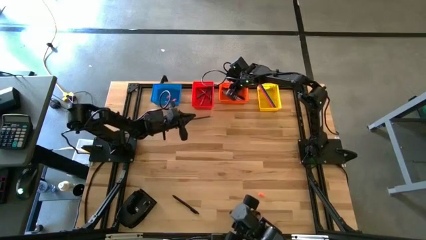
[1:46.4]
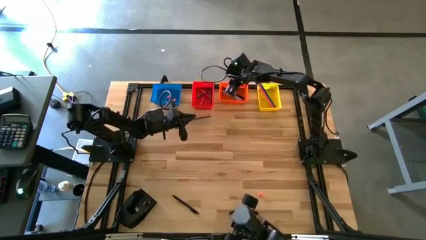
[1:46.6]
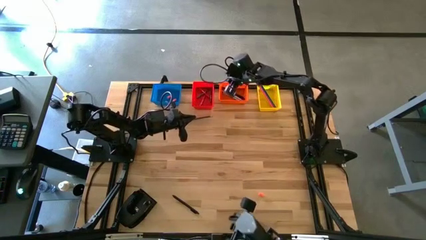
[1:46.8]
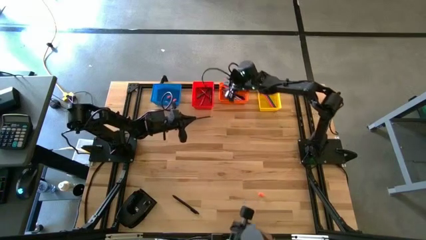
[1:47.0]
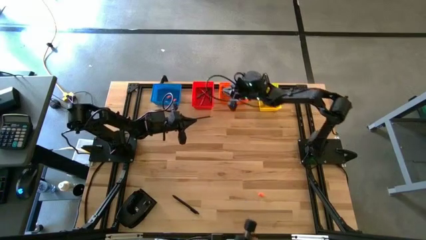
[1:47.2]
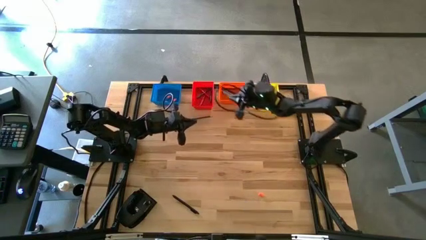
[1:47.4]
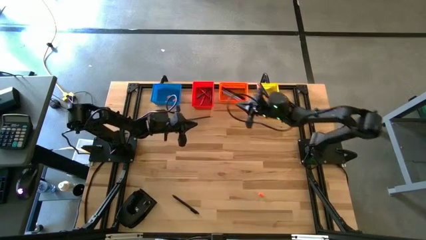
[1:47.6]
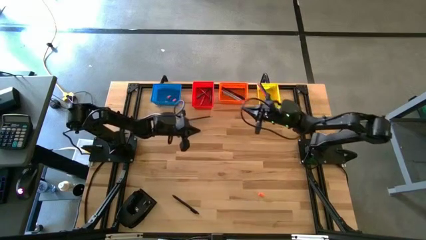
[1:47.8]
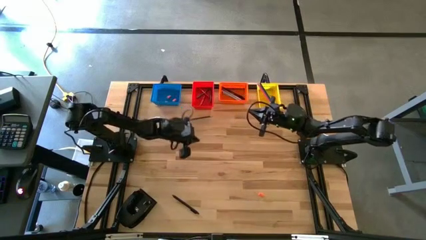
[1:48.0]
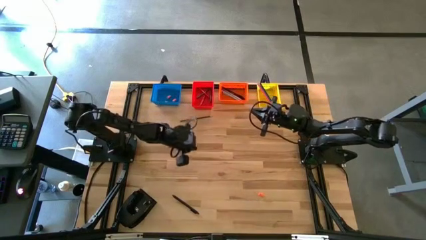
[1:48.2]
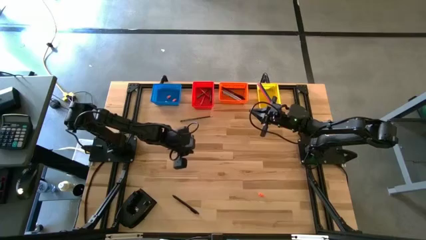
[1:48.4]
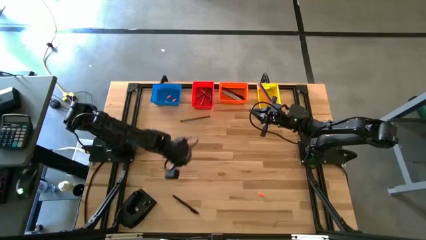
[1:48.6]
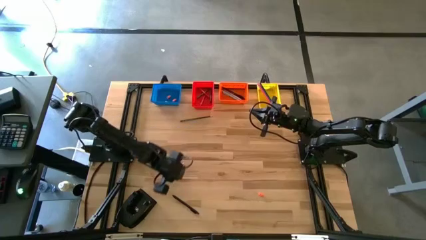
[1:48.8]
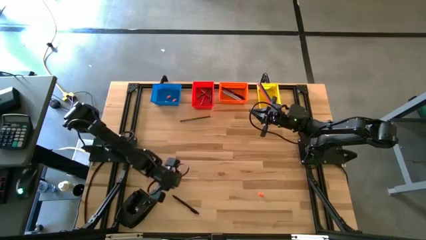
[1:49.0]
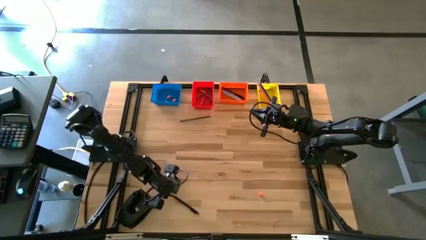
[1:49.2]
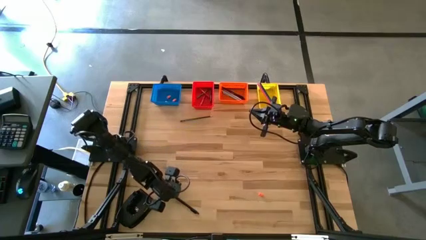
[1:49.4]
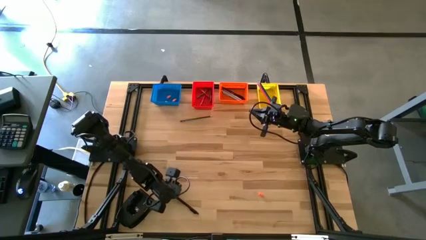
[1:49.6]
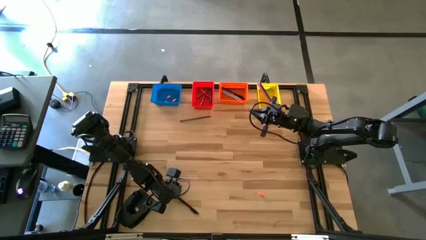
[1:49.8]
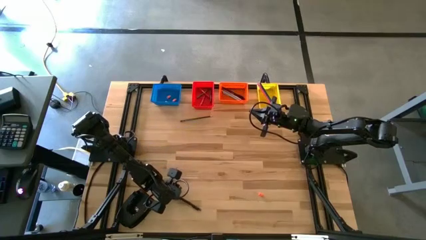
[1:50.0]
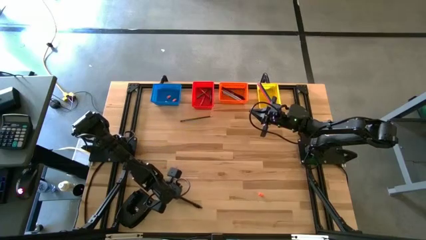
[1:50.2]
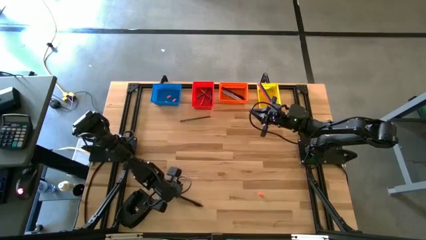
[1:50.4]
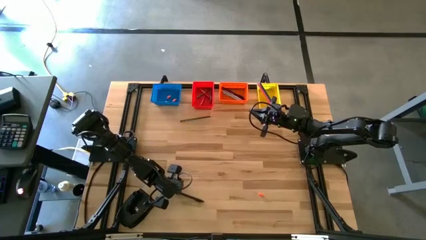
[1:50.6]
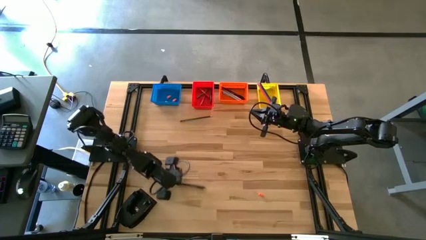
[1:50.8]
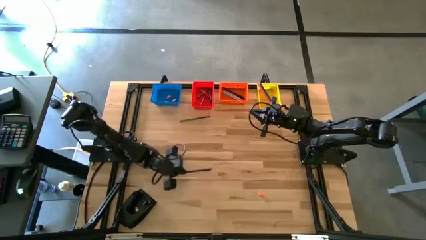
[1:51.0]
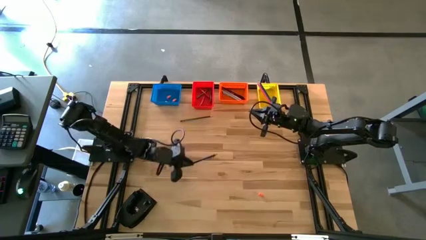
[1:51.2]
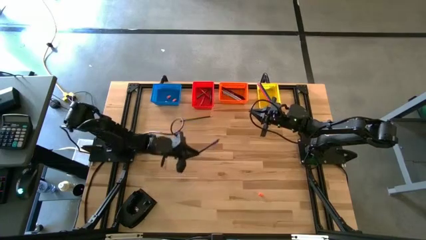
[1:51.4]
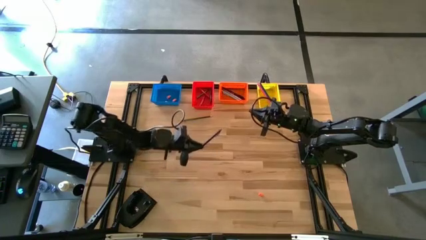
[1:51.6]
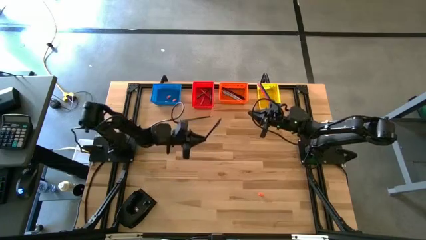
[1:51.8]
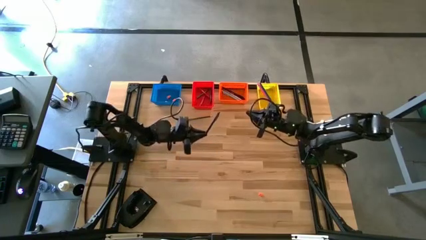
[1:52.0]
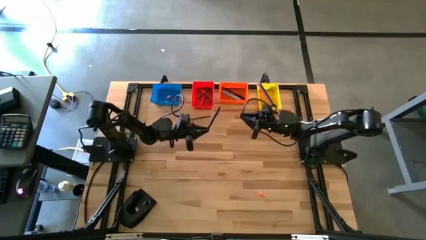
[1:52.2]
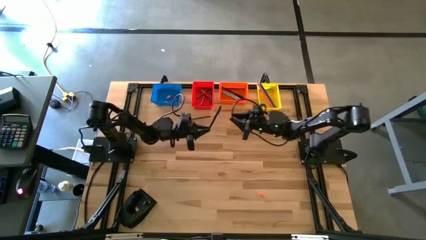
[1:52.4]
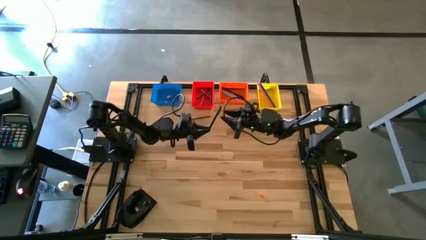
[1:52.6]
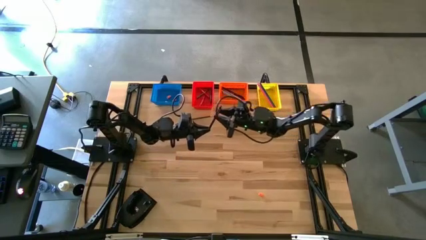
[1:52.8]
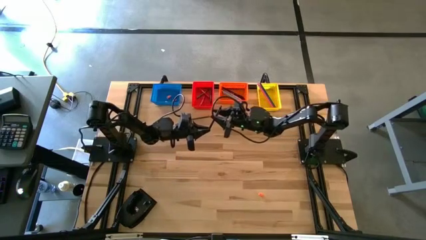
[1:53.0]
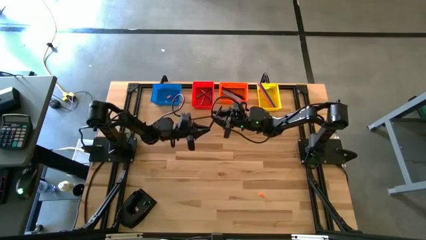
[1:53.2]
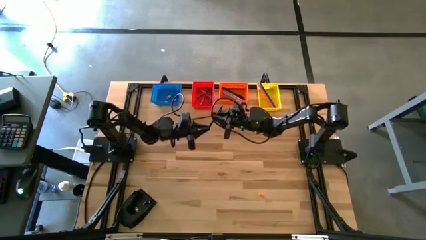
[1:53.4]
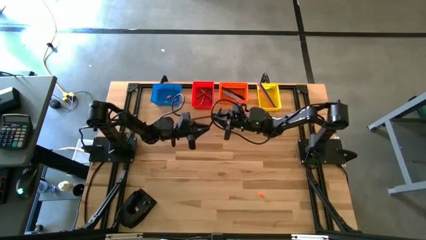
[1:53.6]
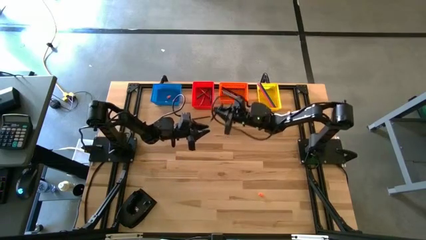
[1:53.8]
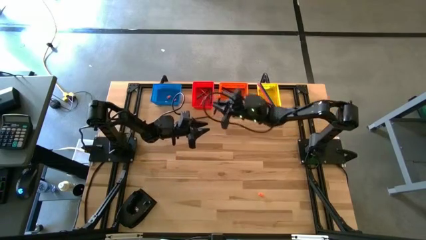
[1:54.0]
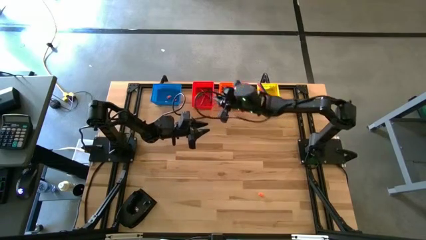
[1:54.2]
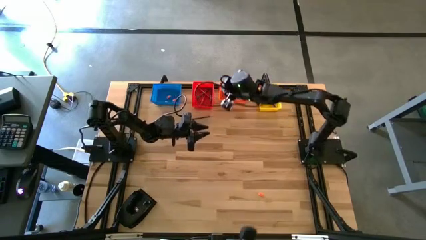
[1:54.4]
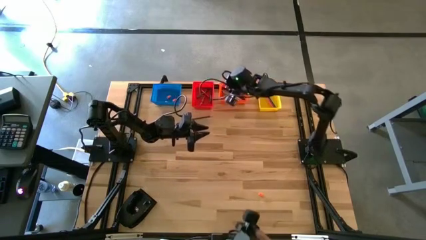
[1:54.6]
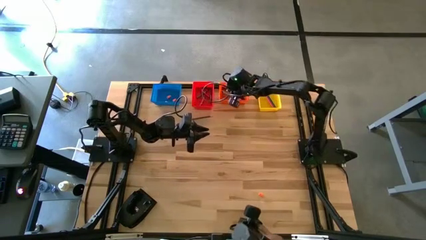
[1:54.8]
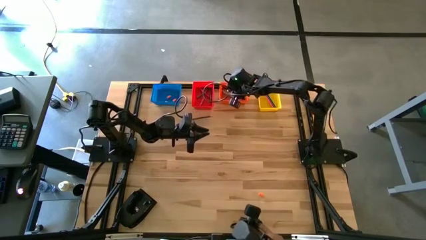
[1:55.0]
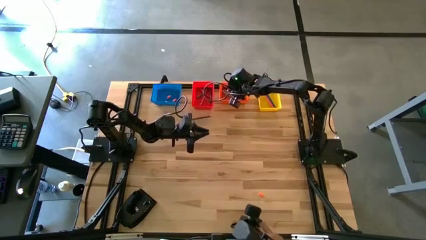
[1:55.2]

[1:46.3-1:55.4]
Task: Sort crayons/erasers/pens/pencils in bins
Put the black pen into the orange bin

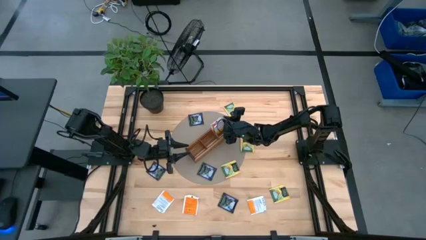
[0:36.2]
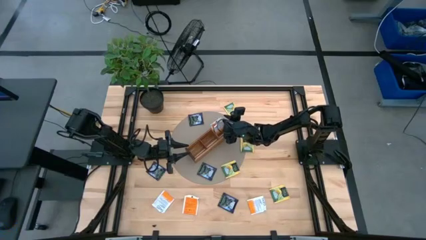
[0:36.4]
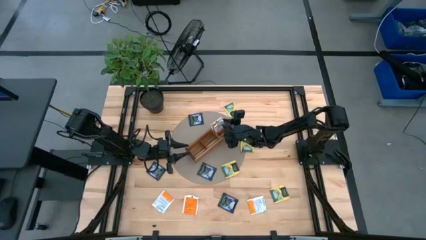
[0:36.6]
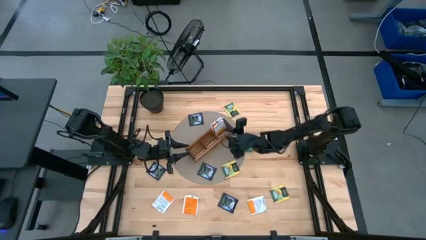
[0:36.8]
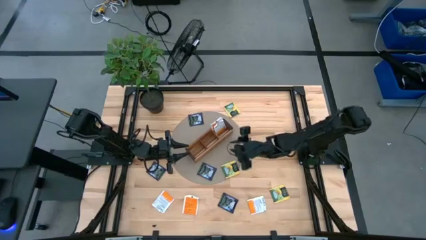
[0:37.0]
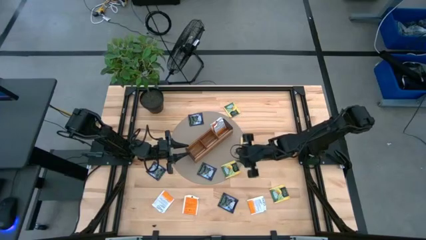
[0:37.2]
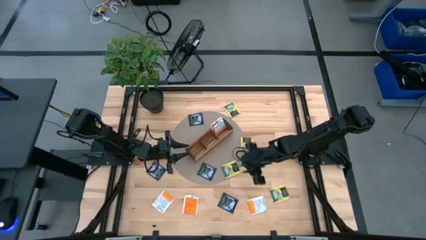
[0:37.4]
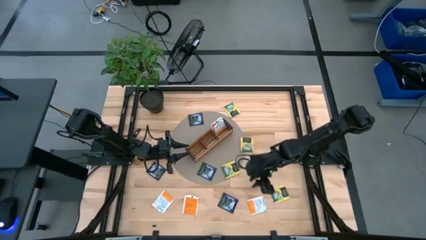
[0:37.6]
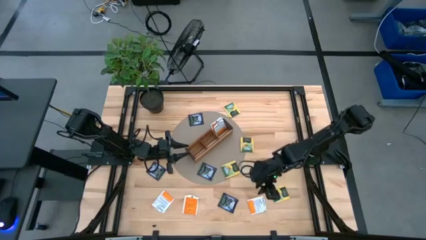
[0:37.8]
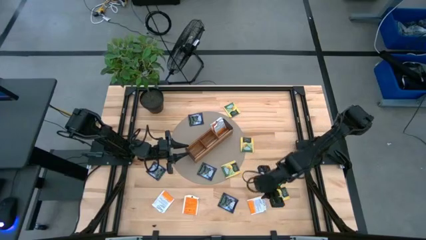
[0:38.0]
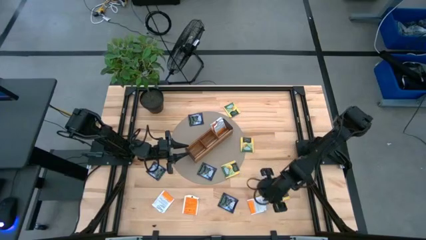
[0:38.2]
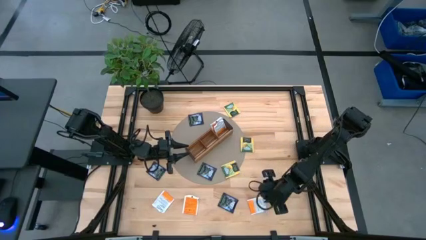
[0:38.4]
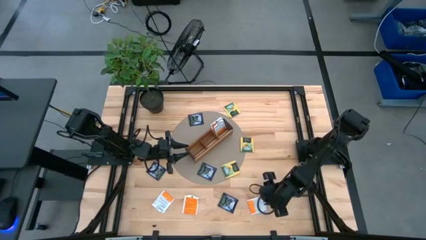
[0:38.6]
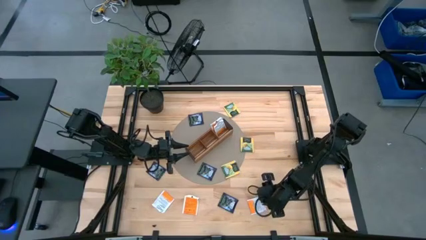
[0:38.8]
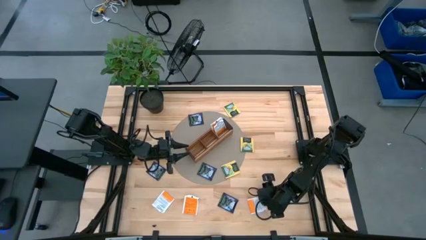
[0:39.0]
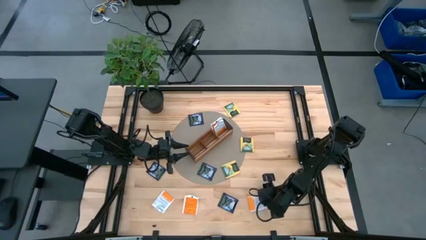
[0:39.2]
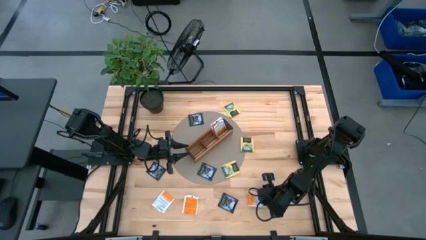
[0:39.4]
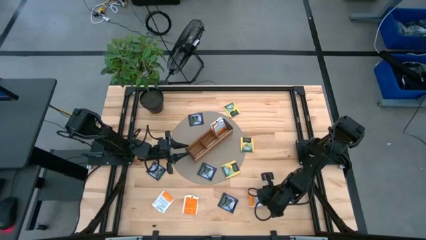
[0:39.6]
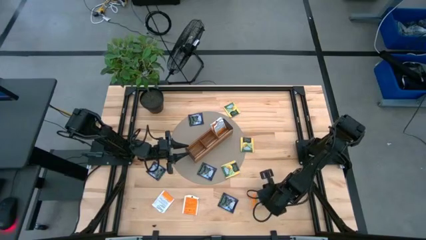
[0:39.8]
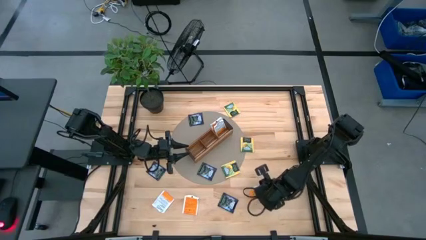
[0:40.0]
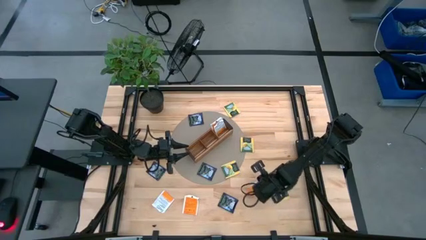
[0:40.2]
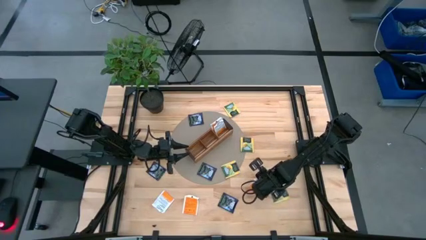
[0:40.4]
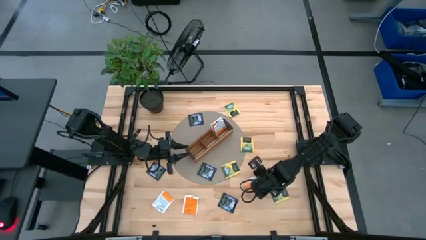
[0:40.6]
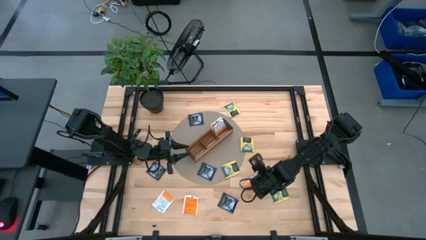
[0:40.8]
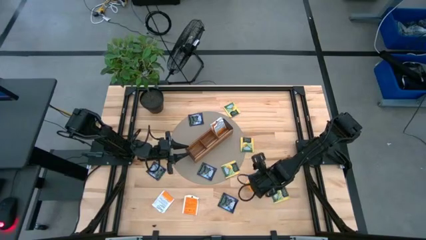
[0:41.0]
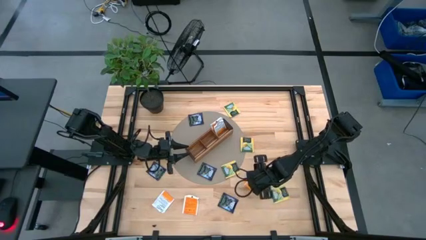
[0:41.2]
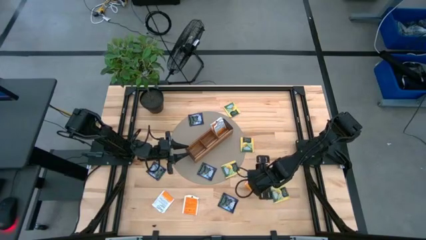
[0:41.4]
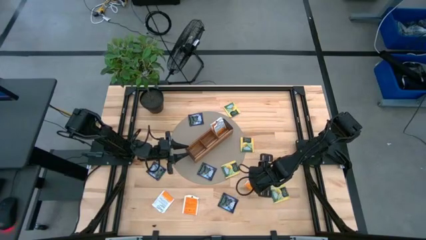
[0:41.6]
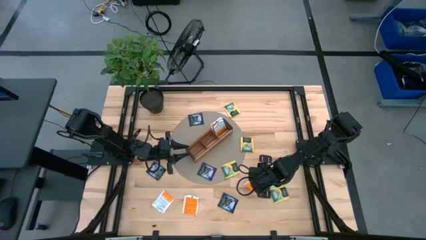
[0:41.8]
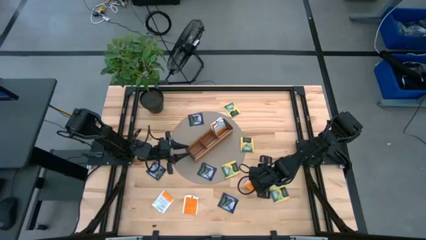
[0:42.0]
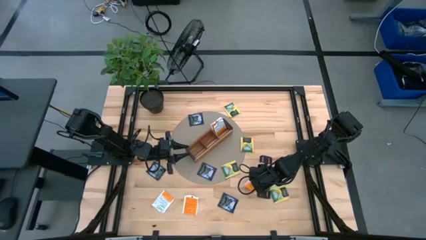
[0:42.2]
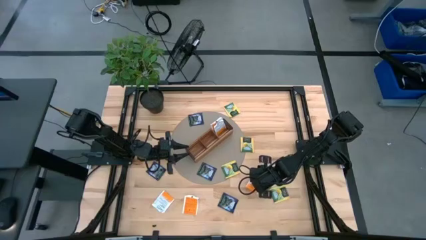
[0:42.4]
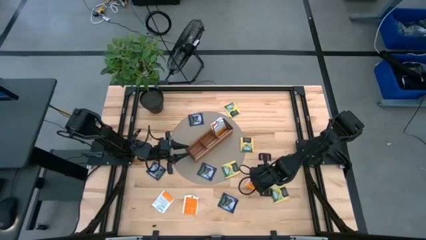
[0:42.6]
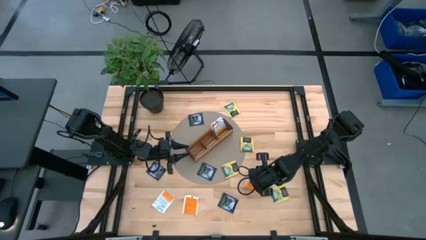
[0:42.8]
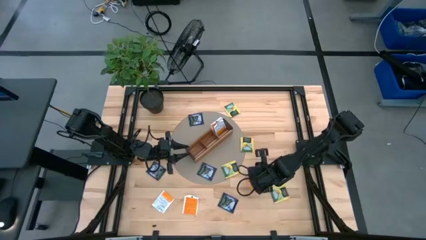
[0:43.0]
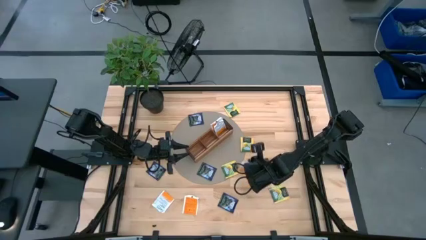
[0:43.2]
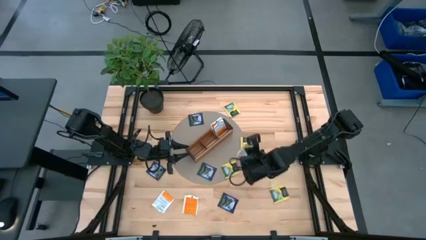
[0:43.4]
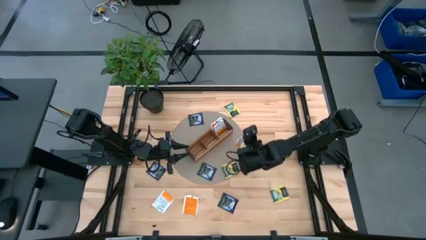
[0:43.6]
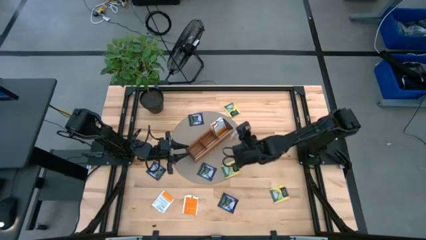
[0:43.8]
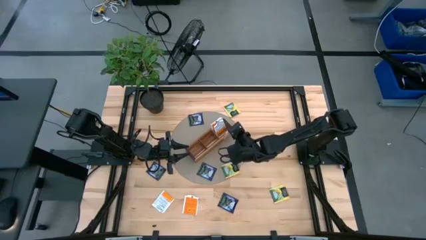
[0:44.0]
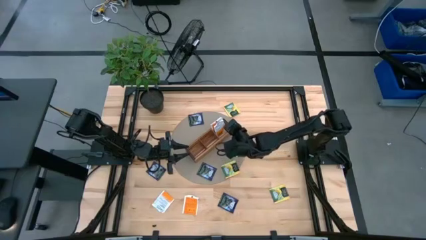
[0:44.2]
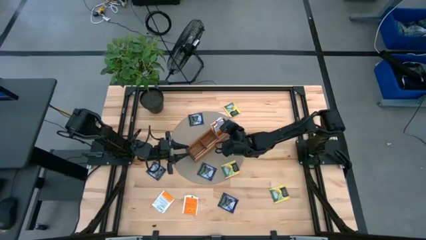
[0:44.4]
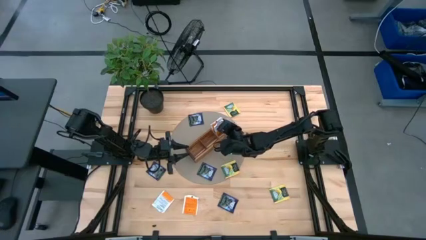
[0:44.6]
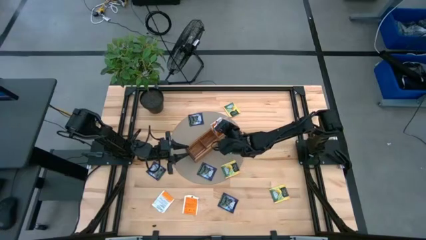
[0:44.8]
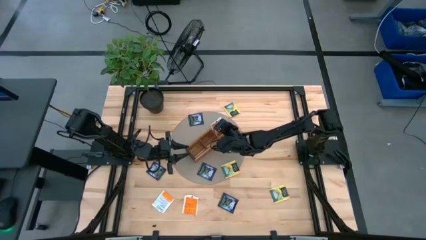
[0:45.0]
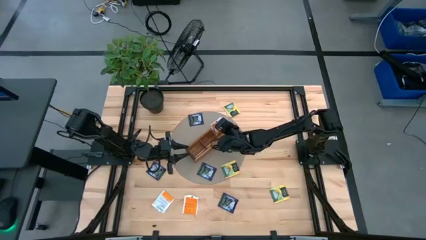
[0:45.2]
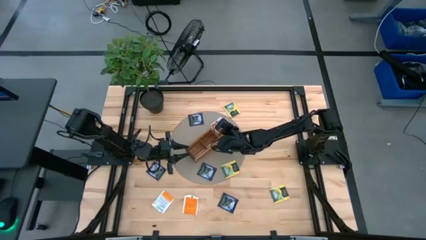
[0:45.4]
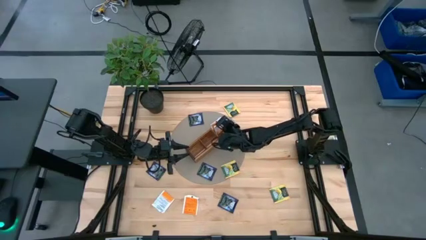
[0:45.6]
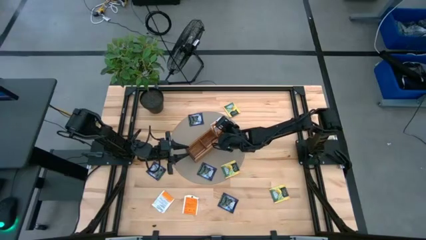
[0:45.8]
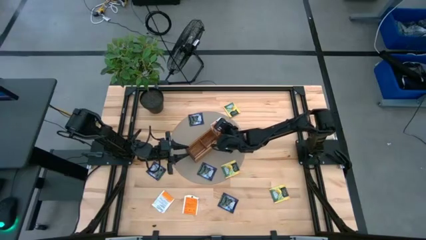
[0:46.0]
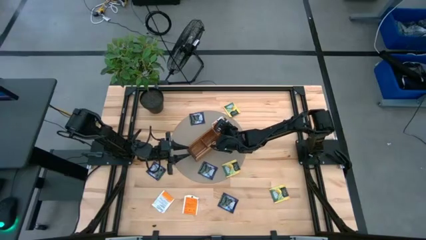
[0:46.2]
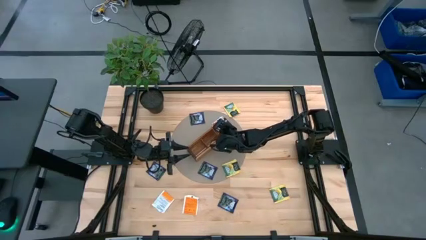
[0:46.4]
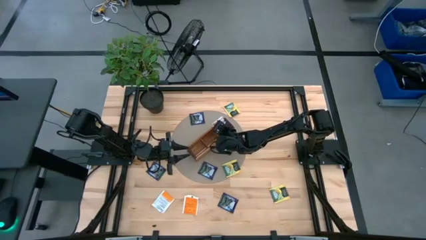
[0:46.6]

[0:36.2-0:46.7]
Task: Pick & Place Tea
Put the orange tea bag into the right section of the wooden organizer
